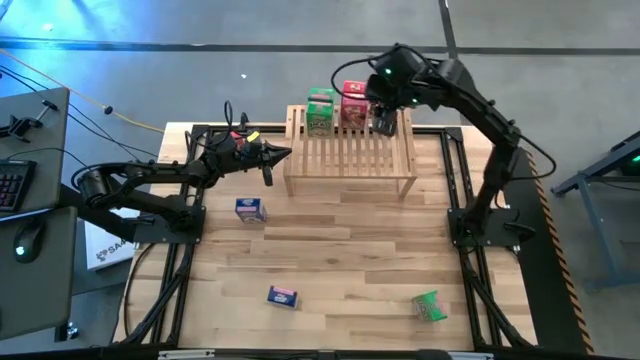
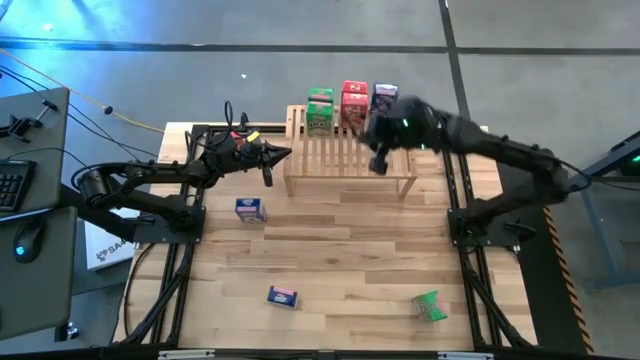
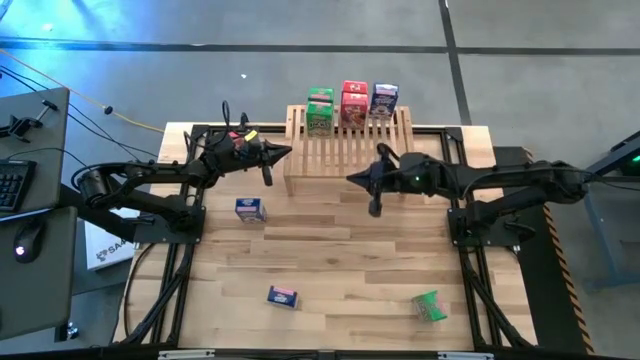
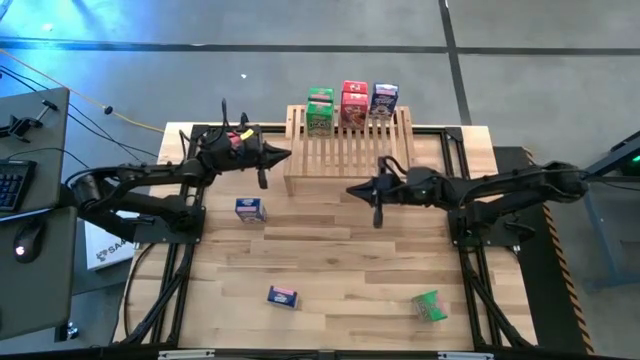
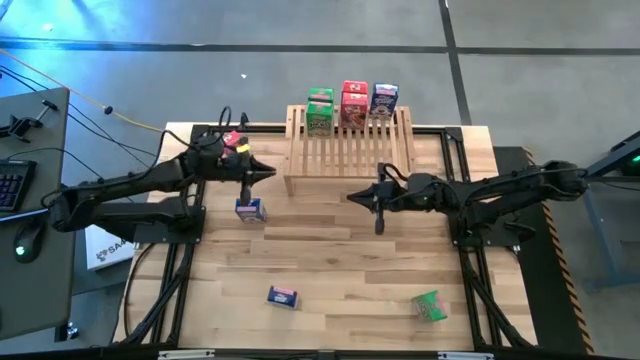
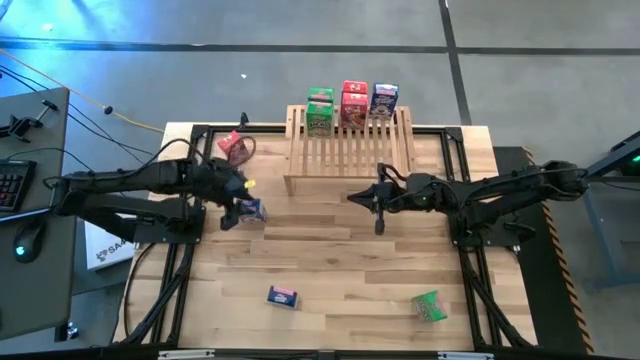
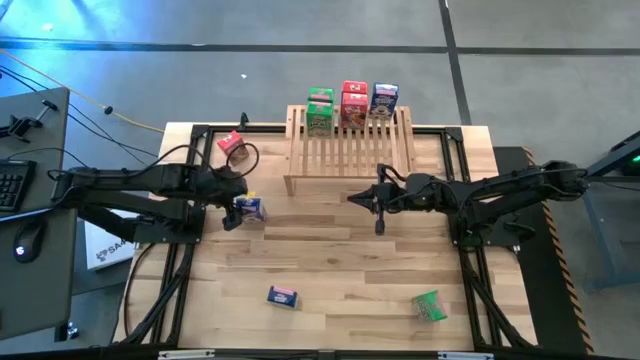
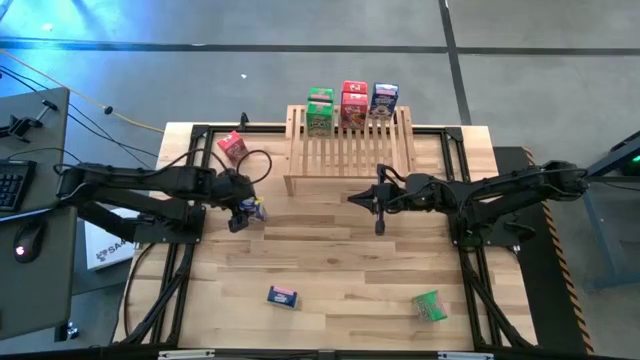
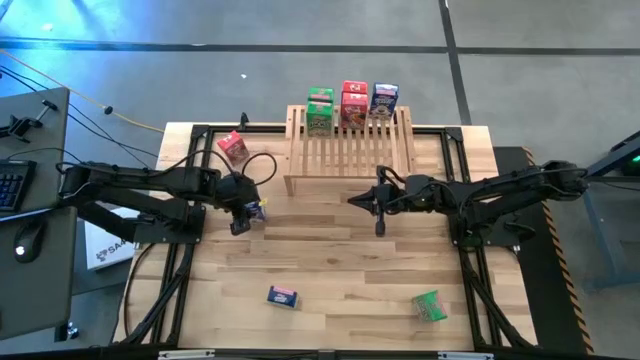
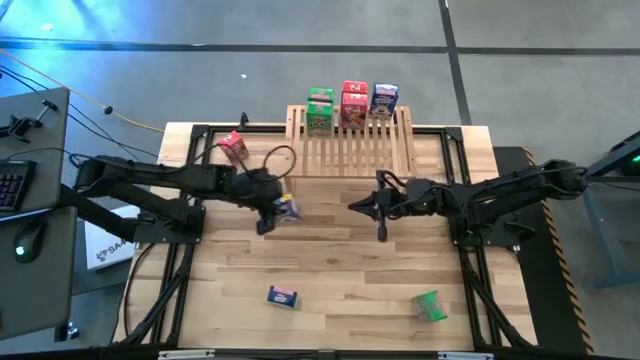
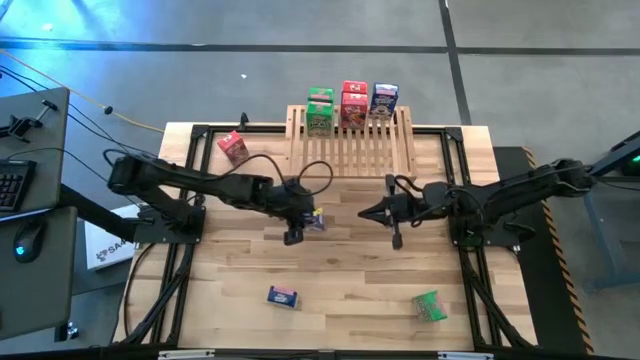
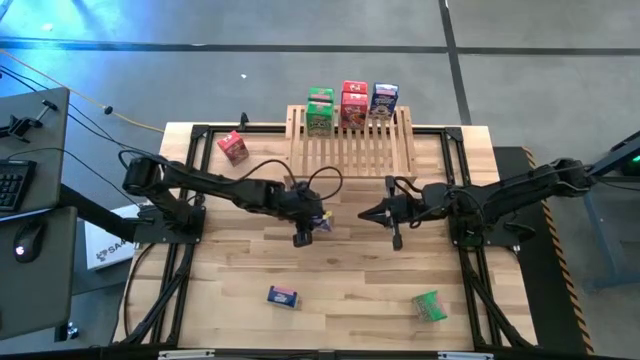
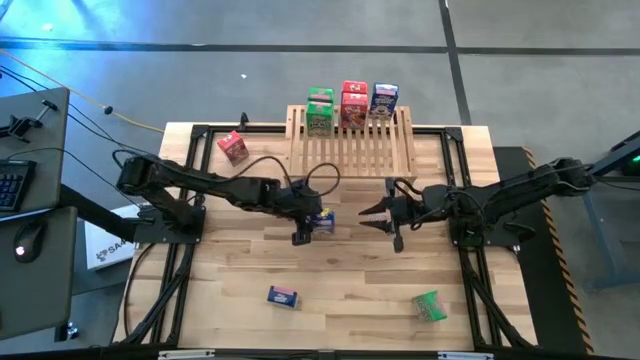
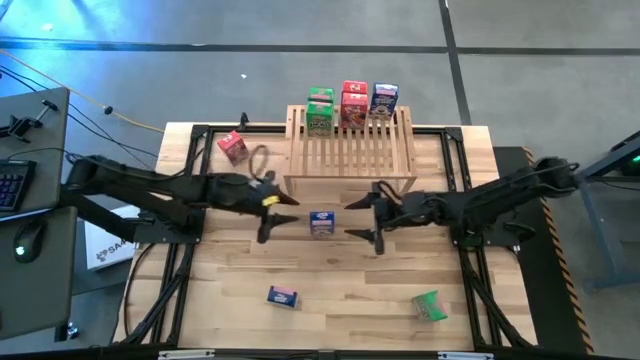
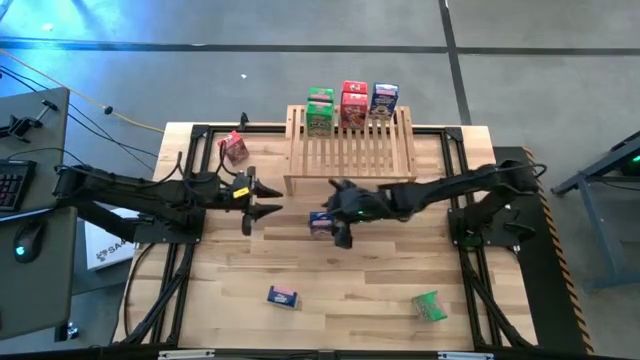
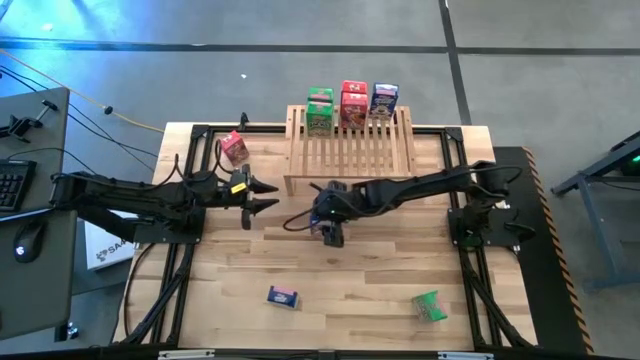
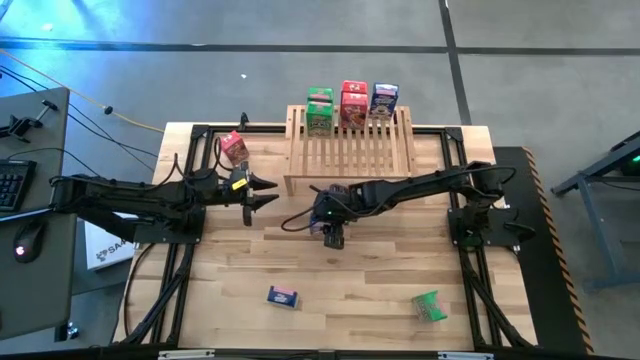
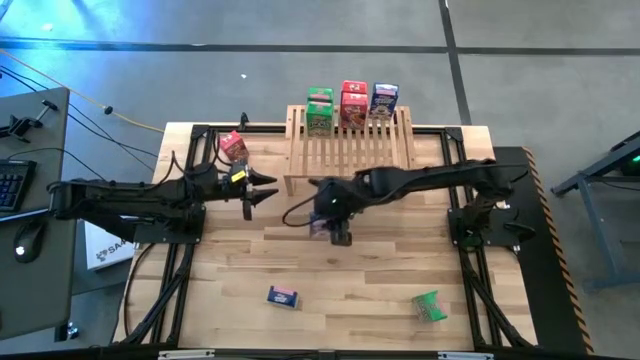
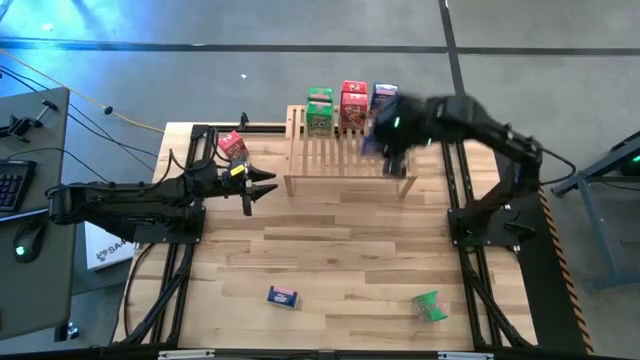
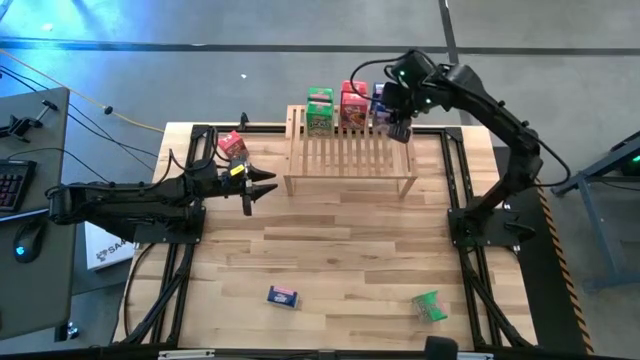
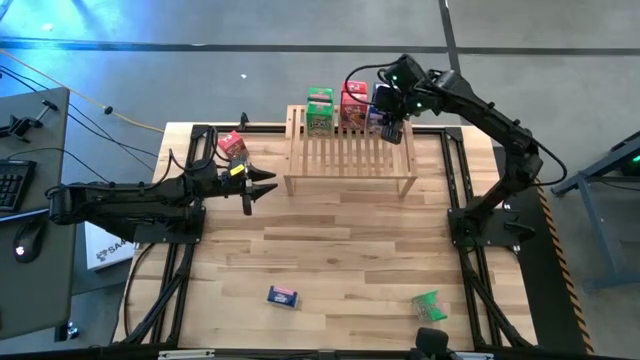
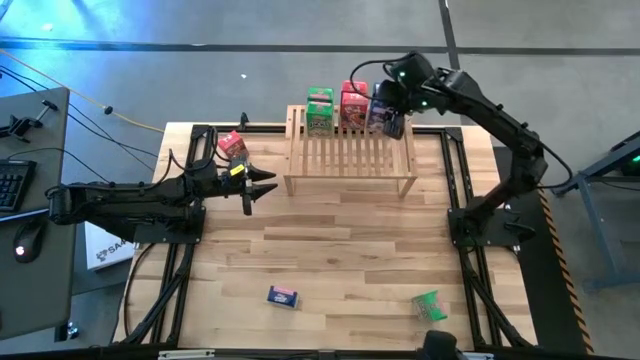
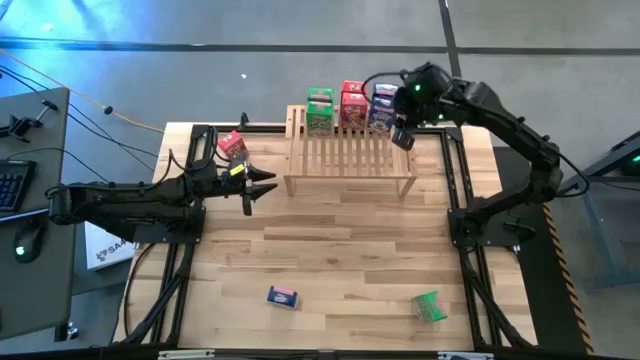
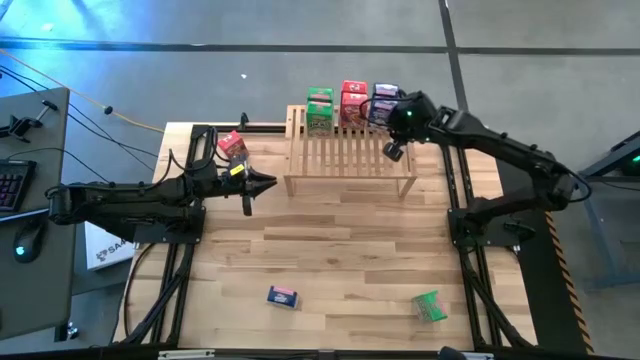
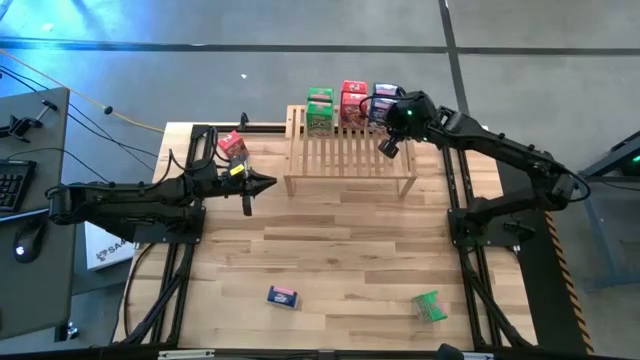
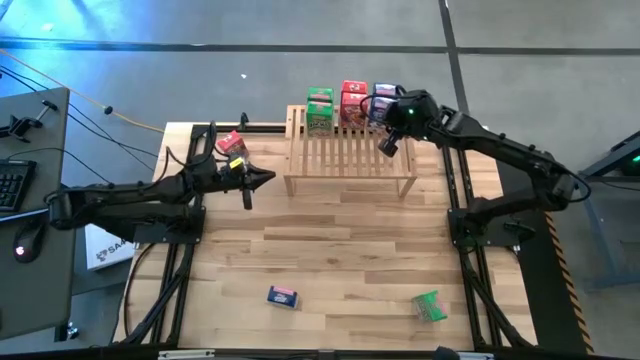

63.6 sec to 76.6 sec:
Task: Stack cereal on shelf
Put the top blue cereal box on the shelf aligned with the other blue cereal box

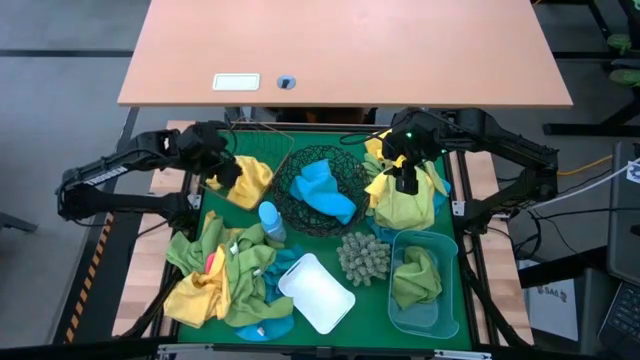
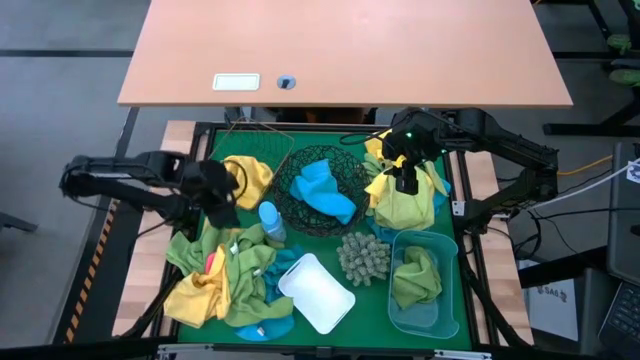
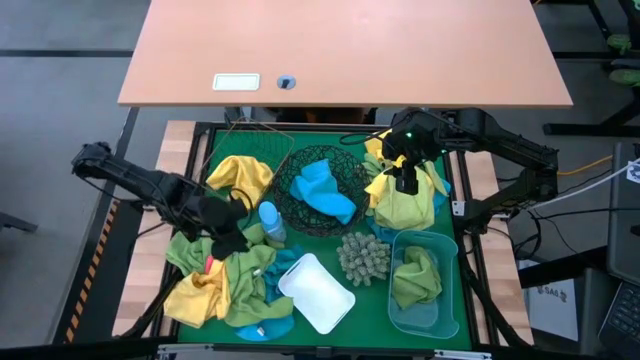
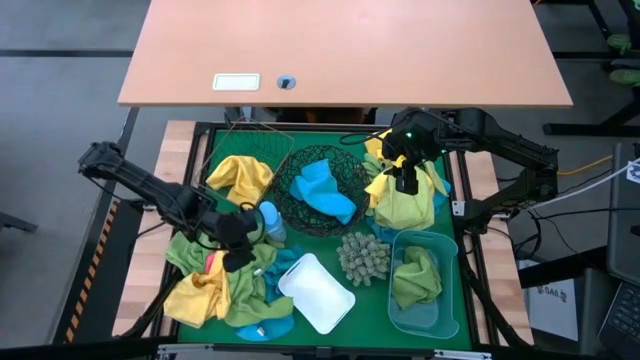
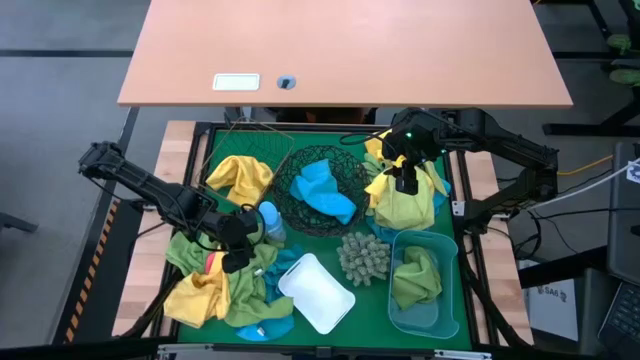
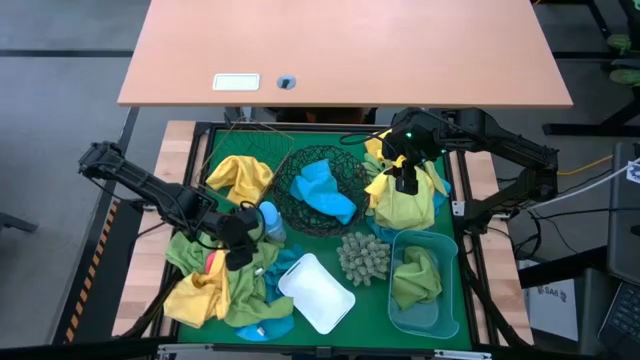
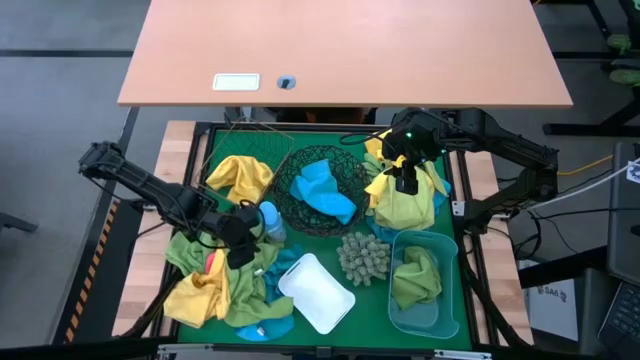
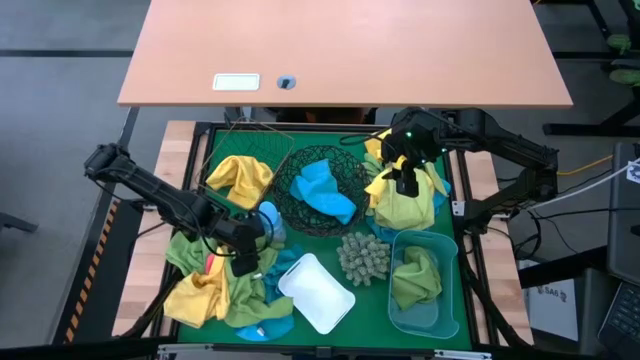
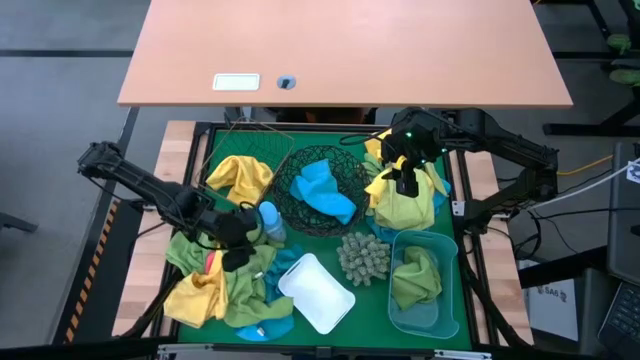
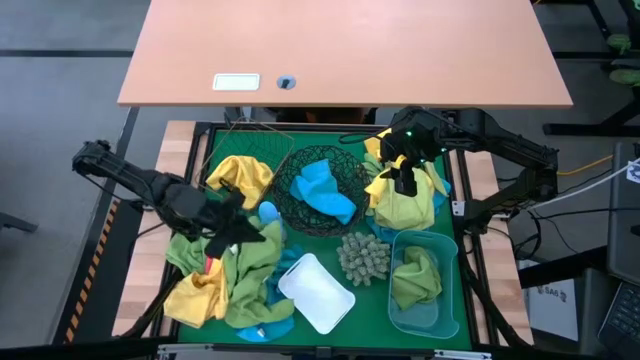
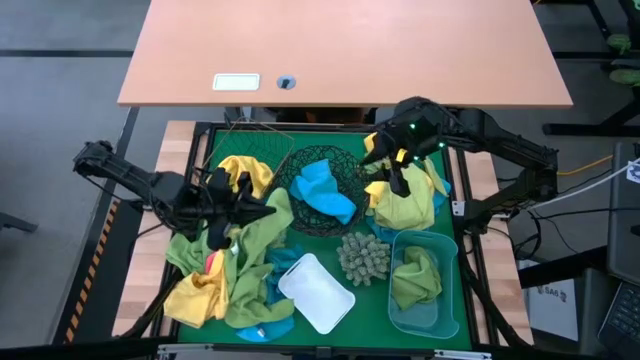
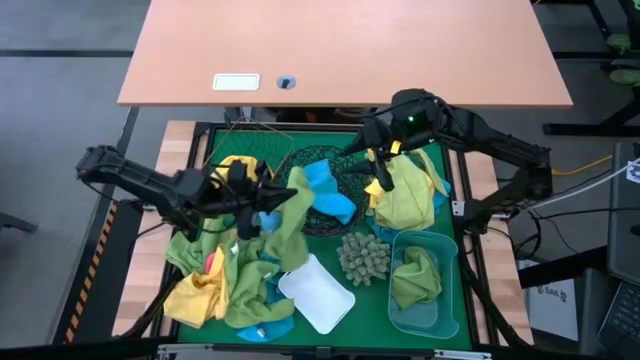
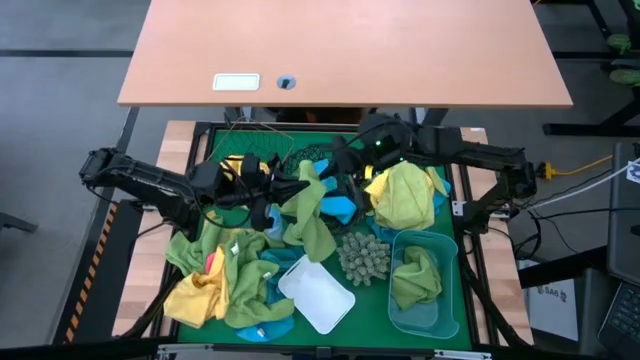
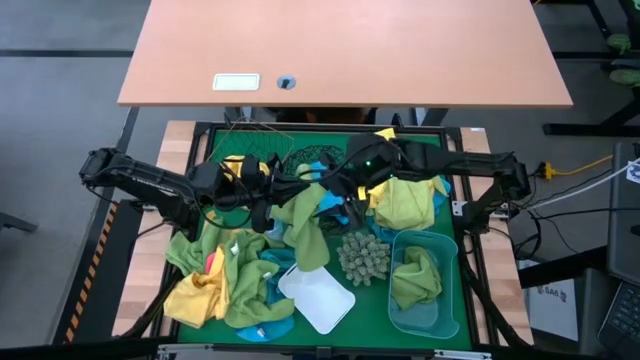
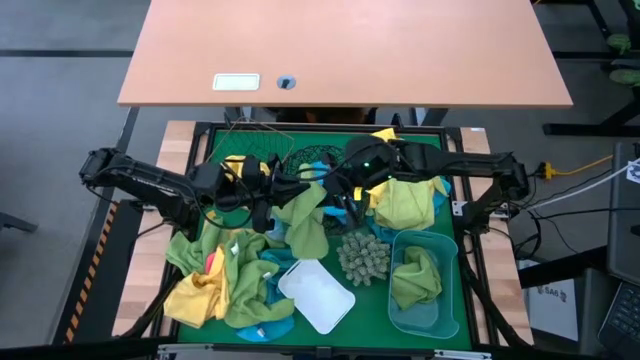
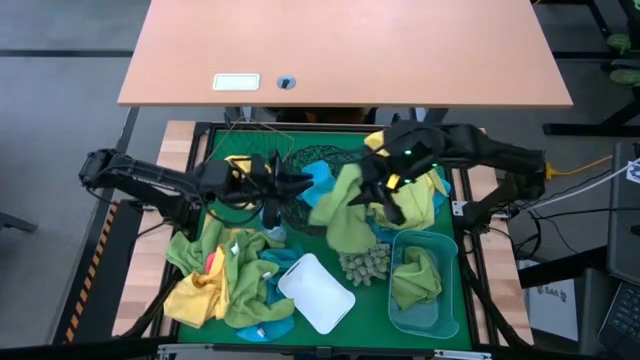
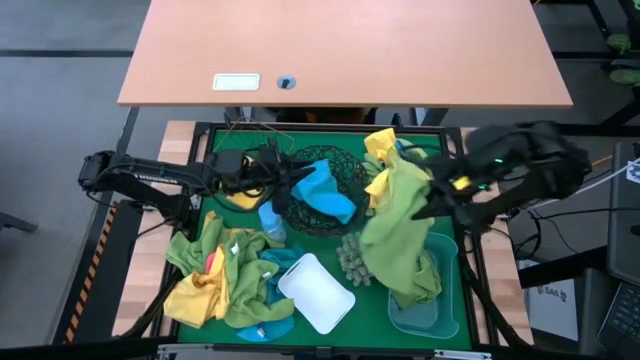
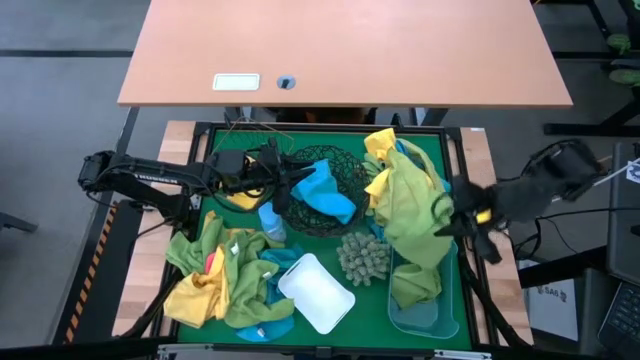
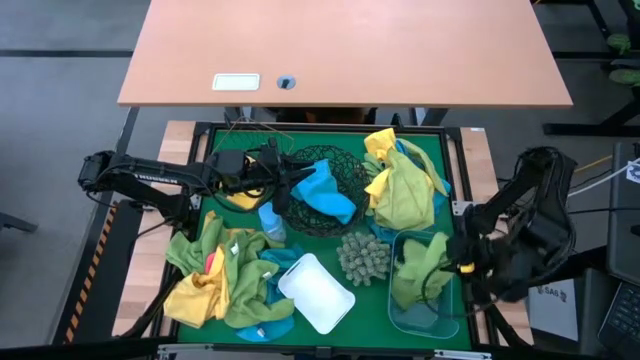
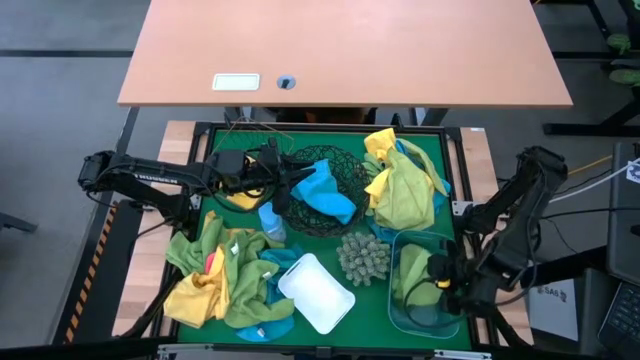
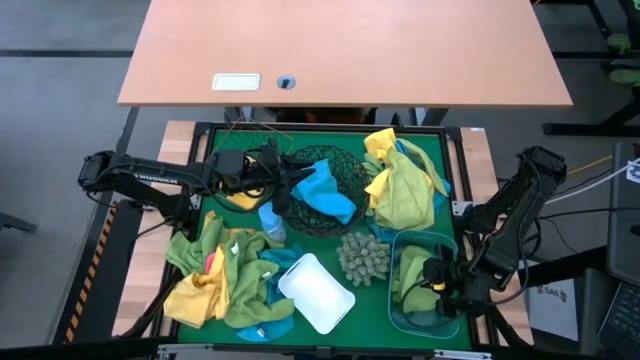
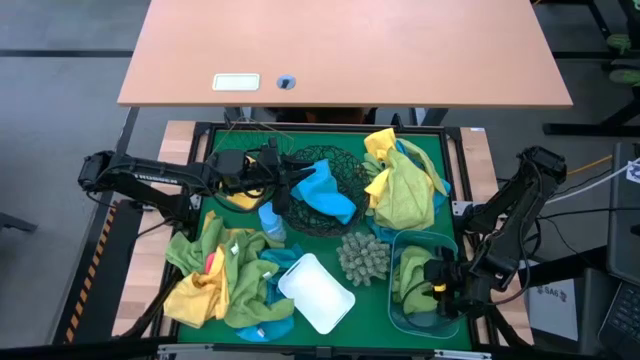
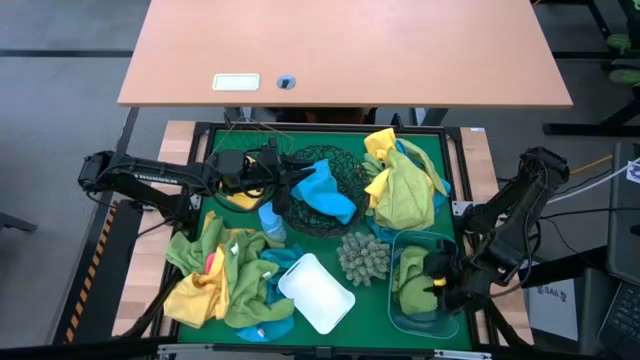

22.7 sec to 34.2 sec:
Task: Sort microfiber towel by color & place in baskets
Put the green microfiber cloth into the blue bin
